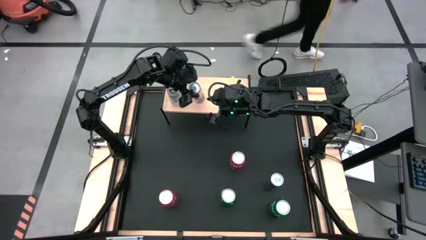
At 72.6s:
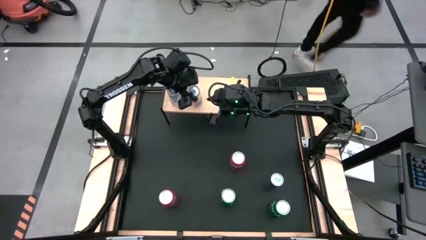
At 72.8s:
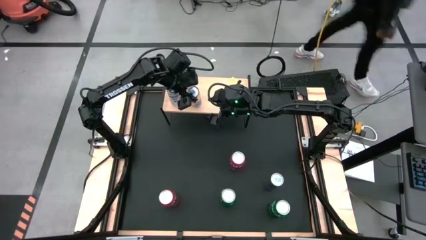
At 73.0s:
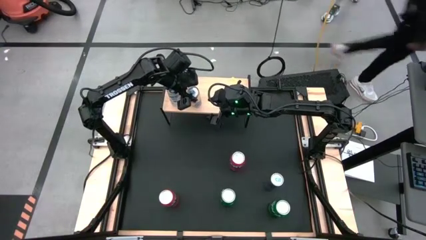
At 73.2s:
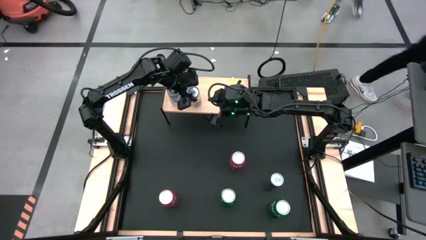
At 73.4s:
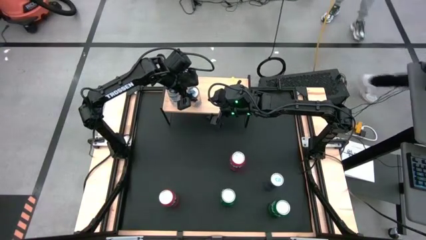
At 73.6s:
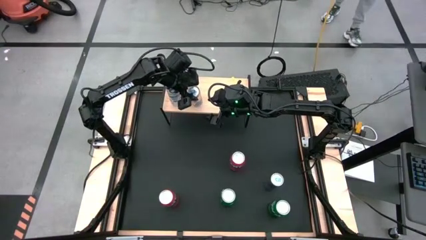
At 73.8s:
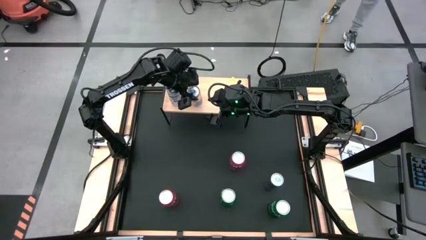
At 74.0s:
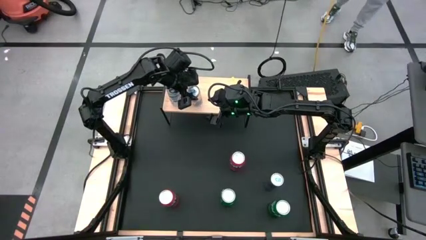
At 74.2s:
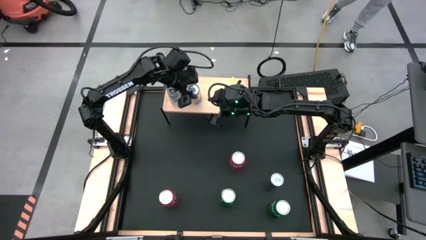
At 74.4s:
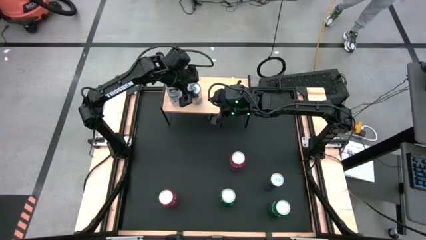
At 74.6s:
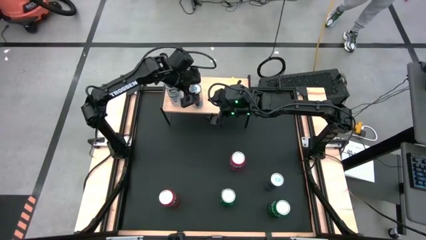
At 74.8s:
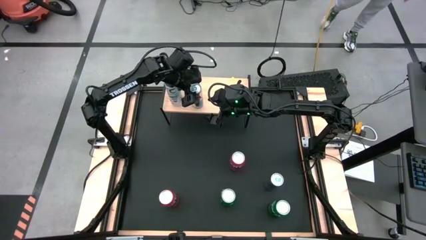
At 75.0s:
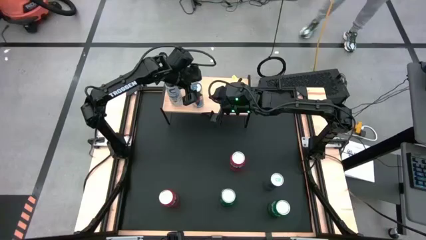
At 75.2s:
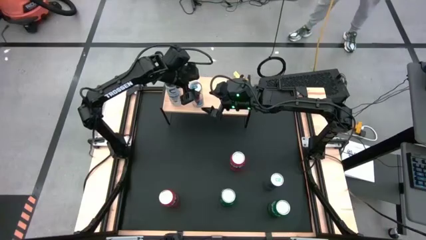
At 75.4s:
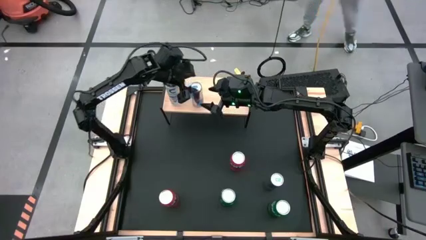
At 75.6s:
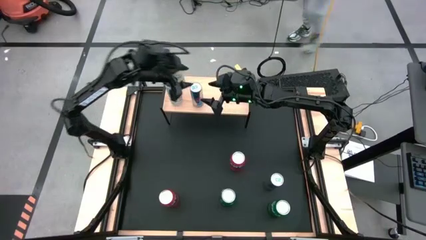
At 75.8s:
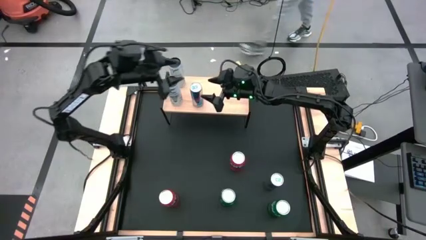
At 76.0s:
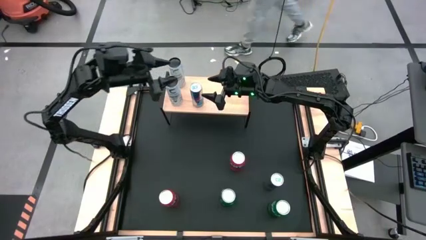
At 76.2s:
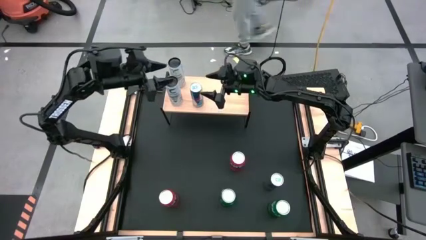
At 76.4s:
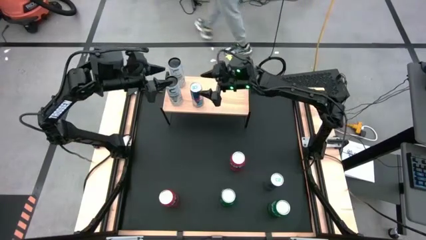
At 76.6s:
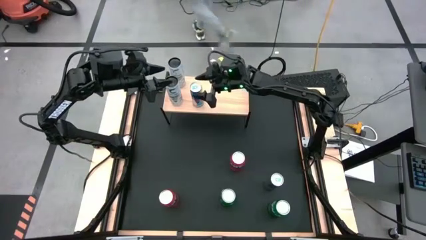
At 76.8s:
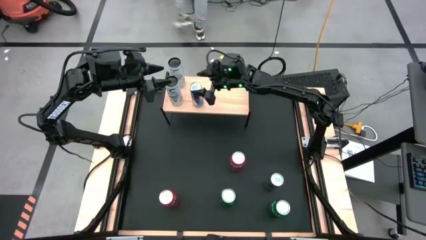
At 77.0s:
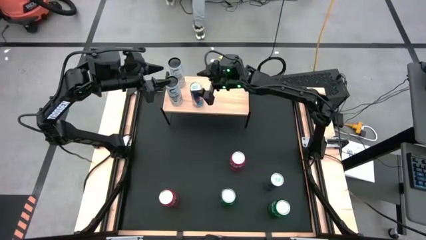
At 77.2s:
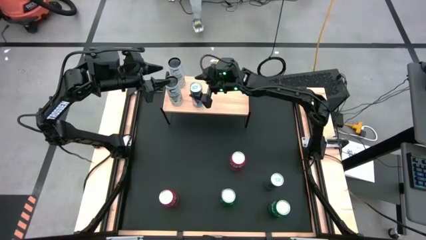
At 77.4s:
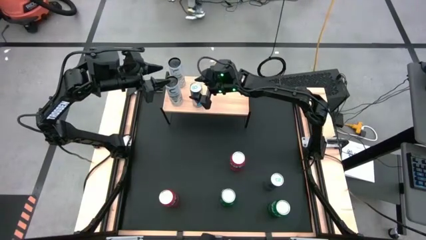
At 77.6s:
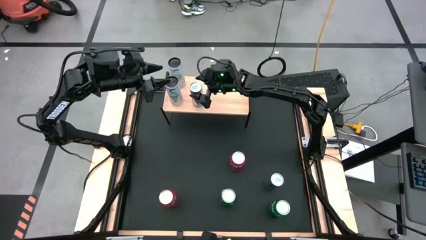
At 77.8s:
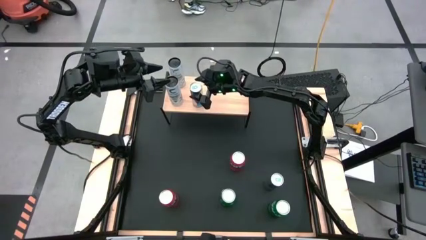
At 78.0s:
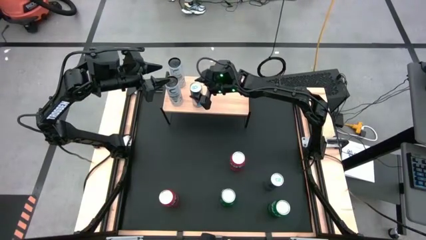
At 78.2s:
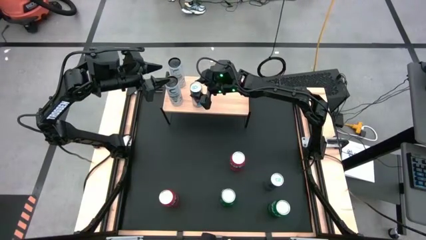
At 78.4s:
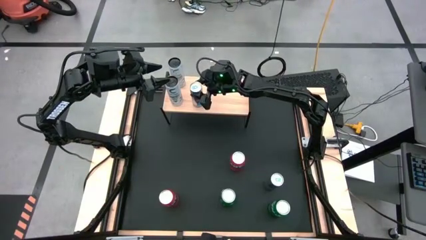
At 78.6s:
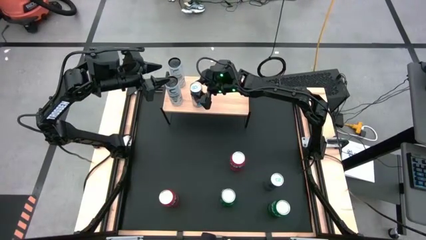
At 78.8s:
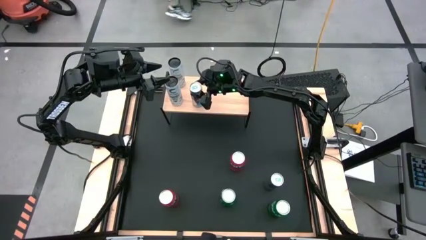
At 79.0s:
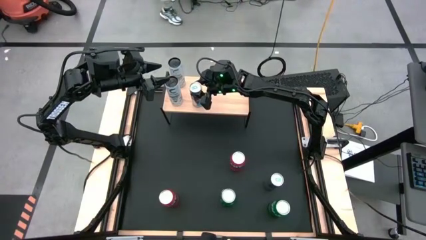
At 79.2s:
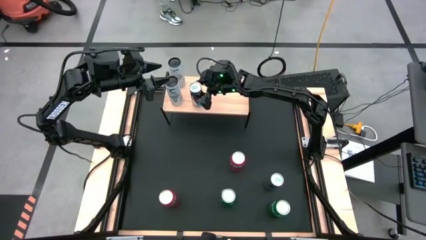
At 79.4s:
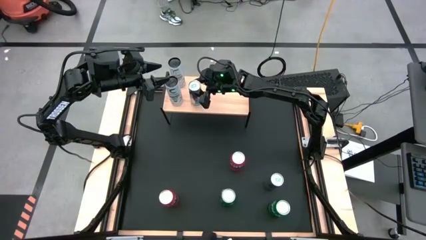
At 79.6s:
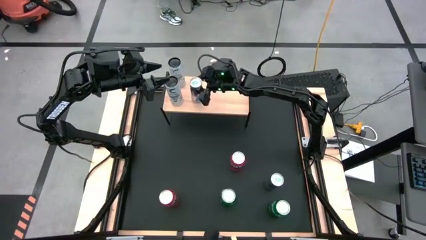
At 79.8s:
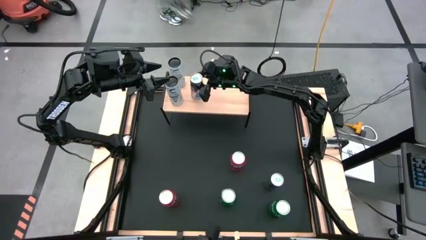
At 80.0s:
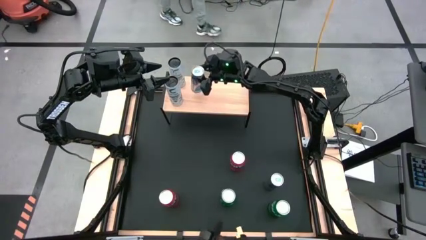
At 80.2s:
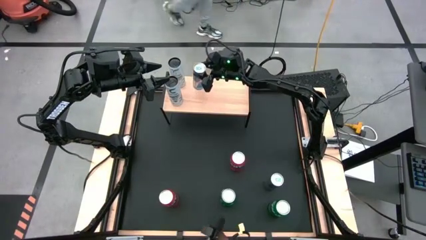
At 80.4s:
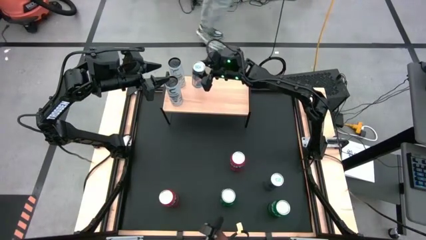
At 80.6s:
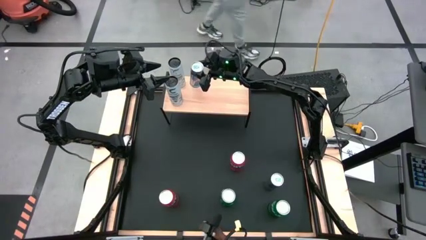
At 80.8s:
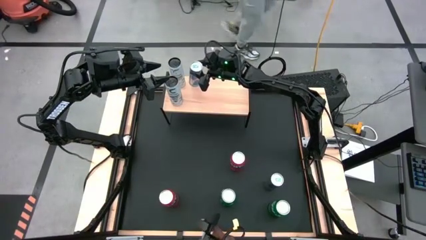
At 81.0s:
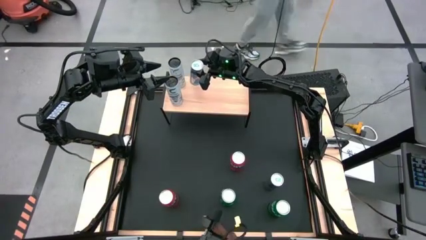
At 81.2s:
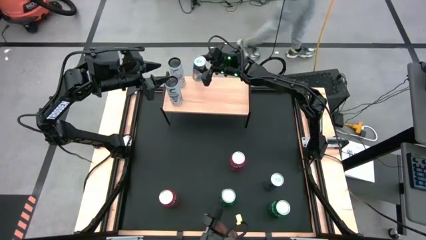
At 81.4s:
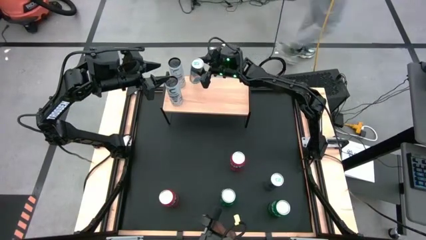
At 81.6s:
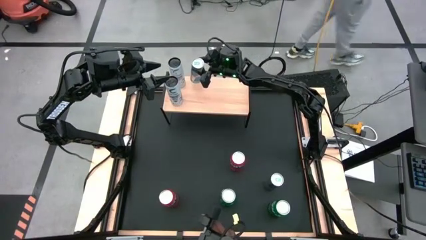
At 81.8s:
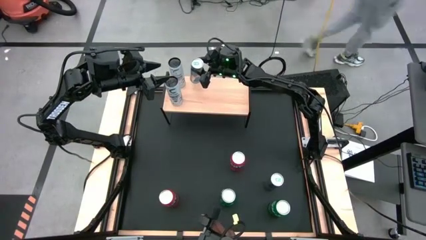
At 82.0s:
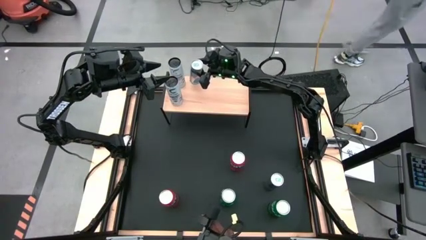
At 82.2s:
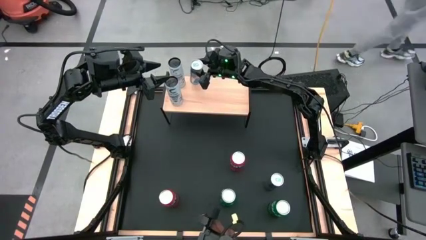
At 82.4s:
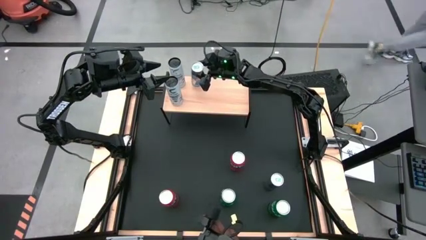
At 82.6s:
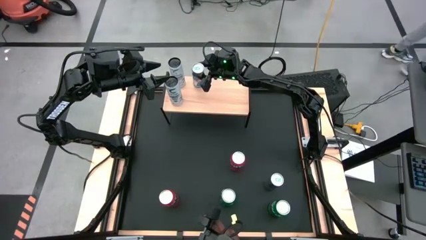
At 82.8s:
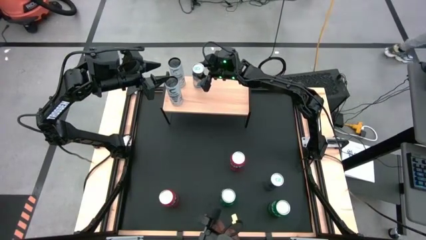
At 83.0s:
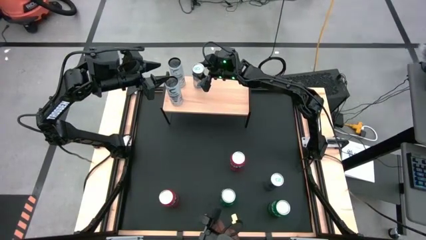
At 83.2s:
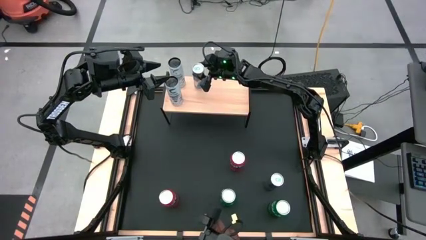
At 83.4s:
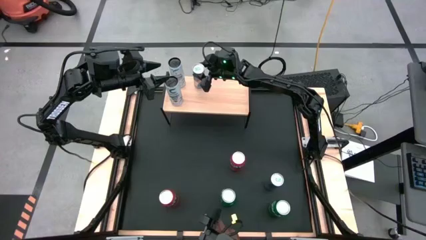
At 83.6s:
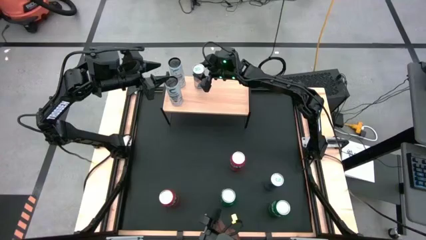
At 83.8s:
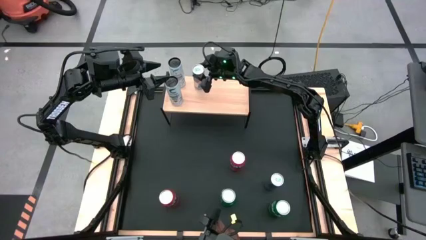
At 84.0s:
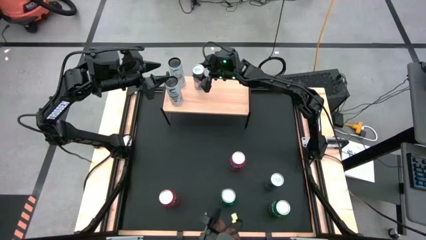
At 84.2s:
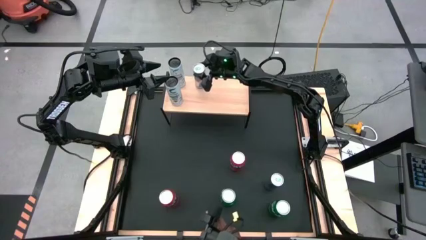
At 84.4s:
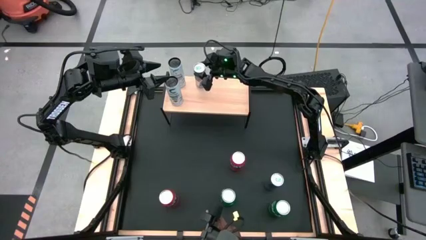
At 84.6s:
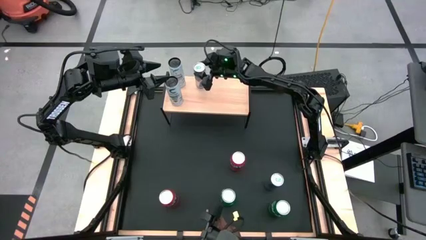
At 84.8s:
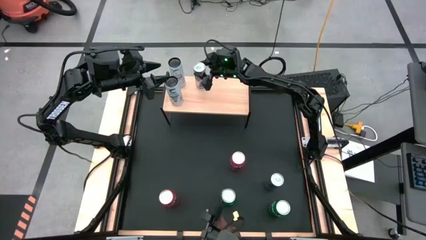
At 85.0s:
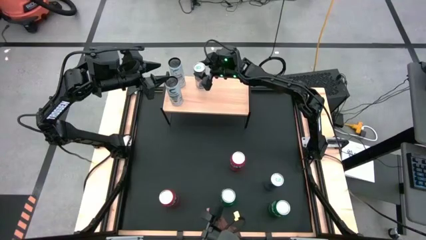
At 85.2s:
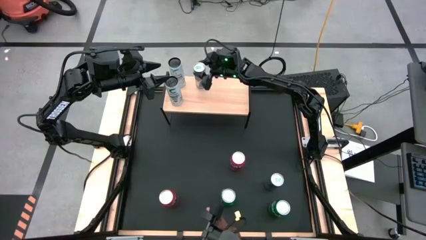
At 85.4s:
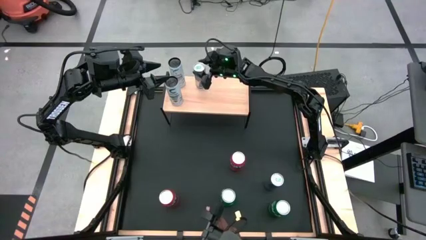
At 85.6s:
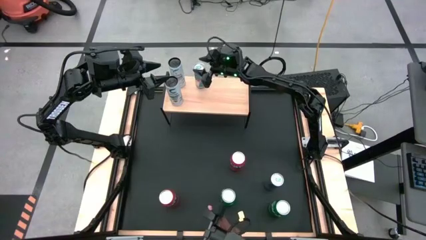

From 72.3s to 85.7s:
Task: Place canned beverage on shelf
Put the left blue soda can on the shelf

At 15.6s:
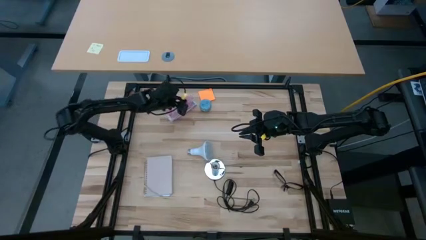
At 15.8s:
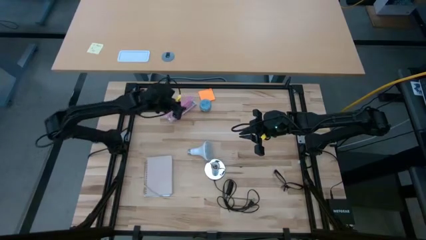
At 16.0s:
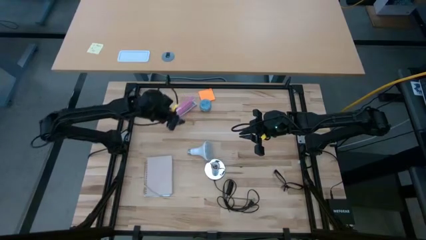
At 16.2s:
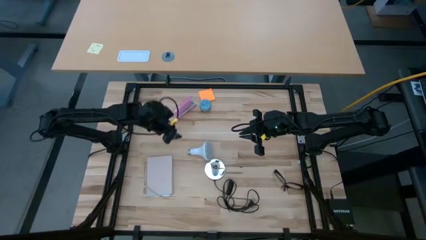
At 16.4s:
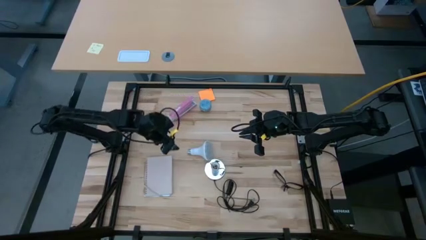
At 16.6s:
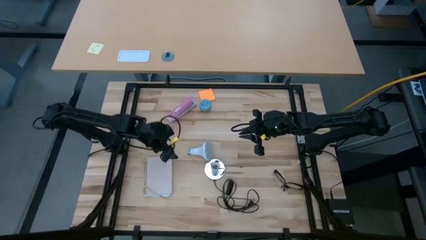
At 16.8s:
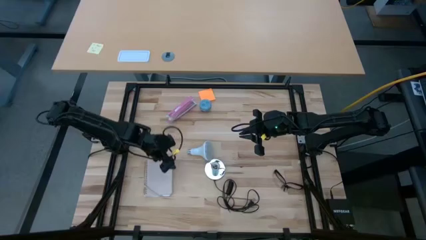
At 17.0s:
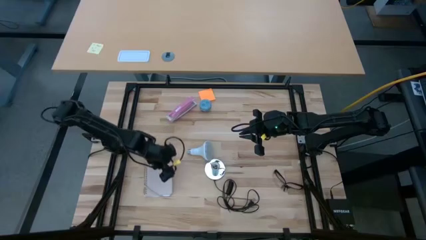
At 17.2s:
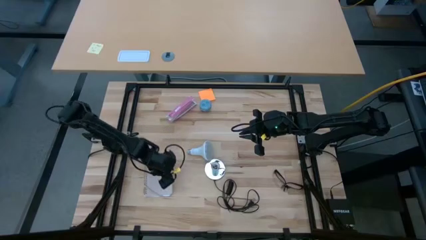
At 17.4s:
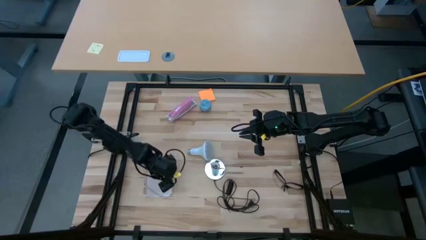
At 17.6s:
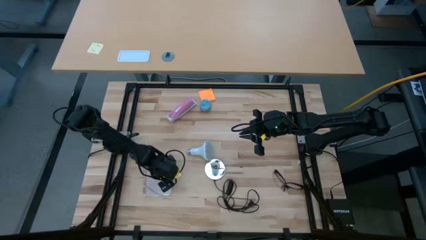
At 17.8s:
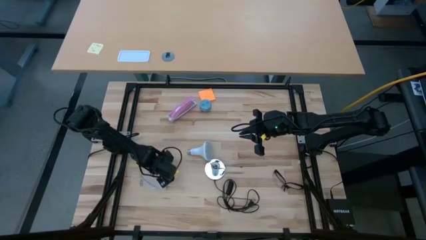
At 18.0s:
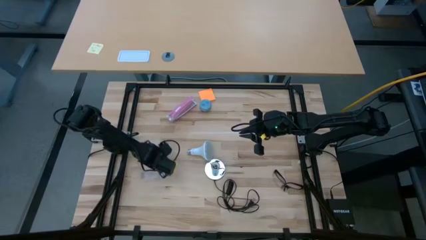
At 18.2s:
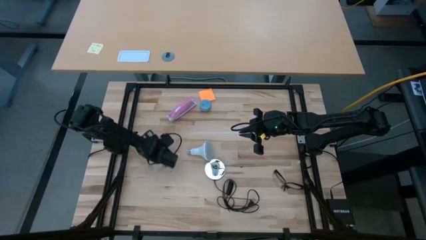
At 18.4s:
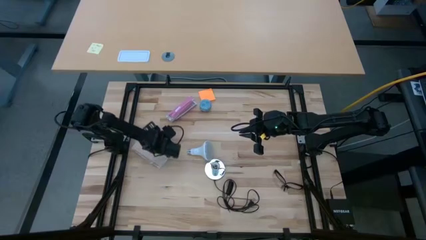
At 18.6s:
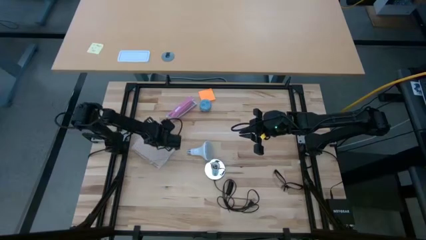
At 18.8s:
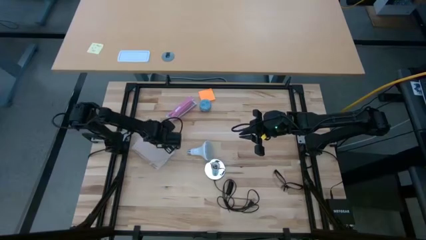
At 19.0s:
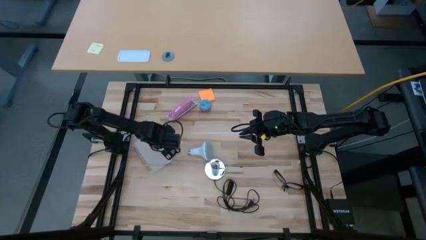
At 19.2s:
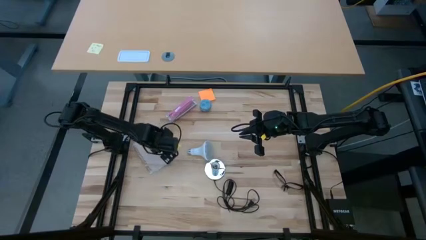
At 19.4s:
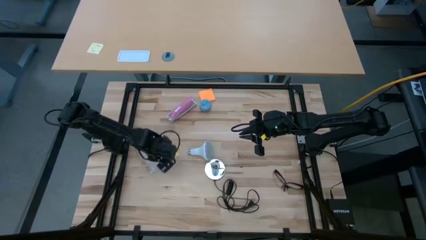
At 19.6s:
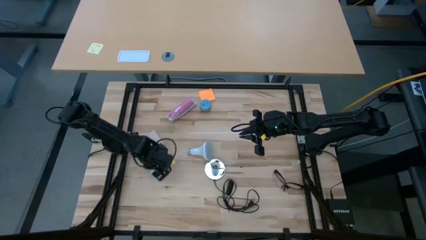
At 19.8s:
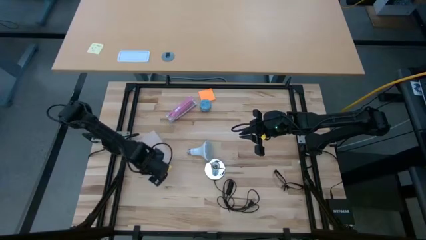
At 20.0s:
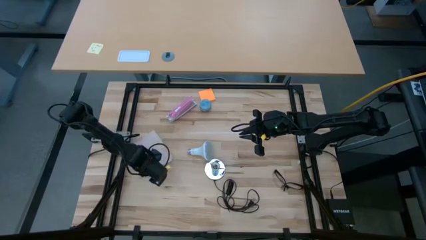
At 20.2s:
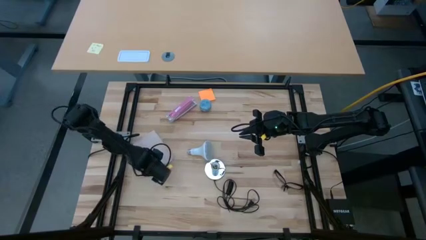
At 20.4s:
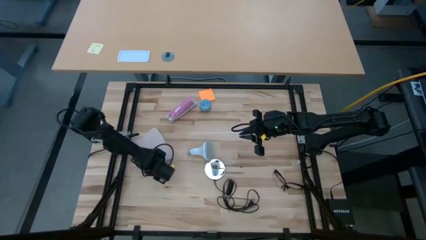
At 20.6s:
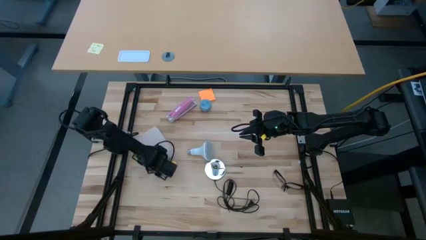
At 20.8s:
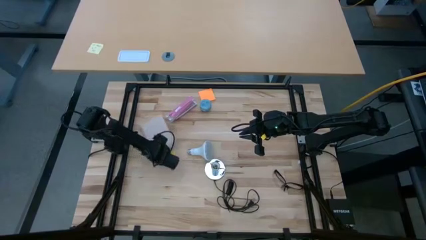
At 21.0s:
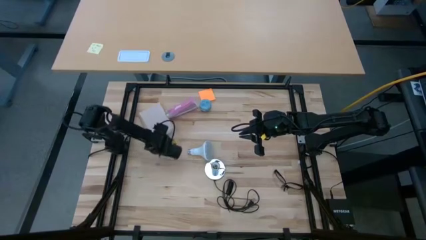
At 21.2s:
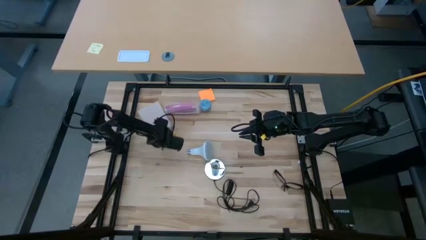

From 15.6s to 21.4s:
Task: Screw lightbulb
Move the brown notebook to the top left of the table
